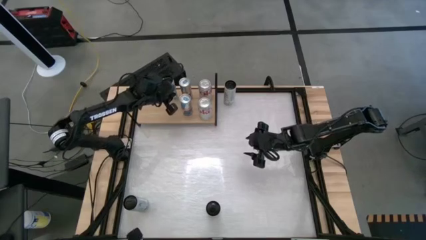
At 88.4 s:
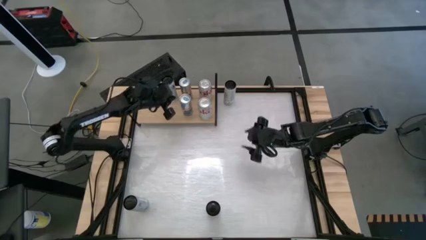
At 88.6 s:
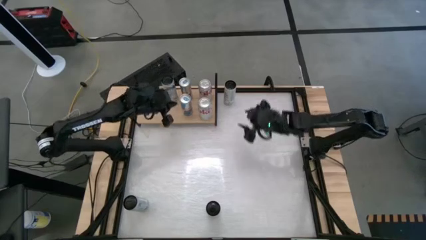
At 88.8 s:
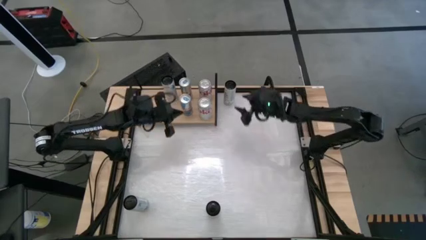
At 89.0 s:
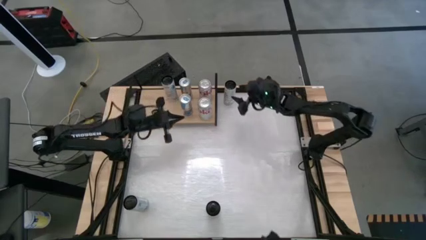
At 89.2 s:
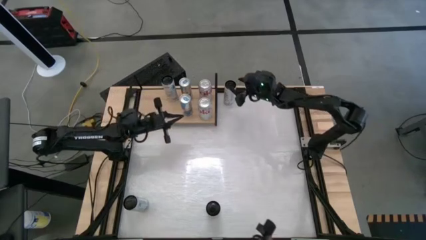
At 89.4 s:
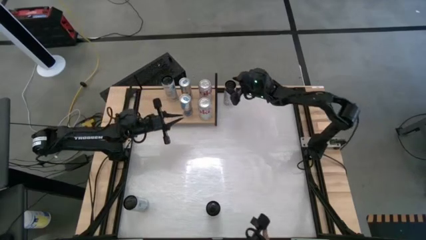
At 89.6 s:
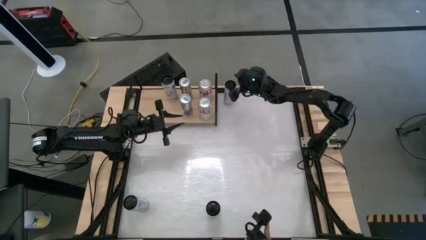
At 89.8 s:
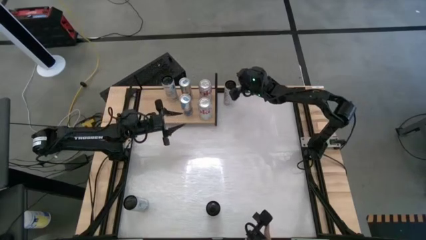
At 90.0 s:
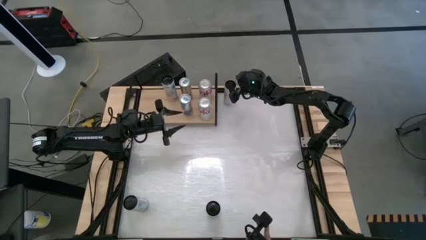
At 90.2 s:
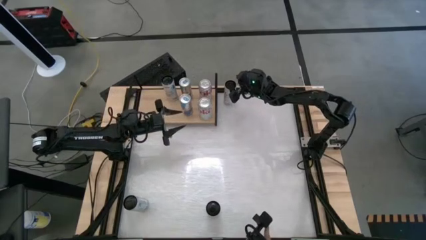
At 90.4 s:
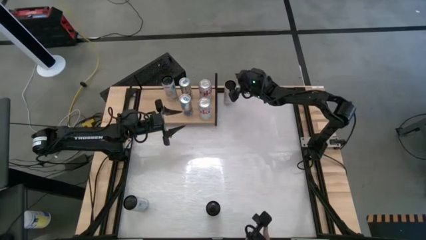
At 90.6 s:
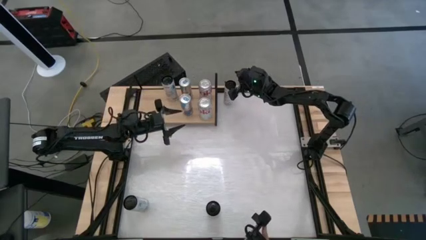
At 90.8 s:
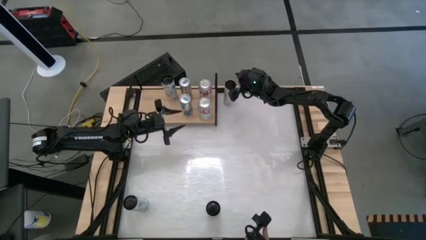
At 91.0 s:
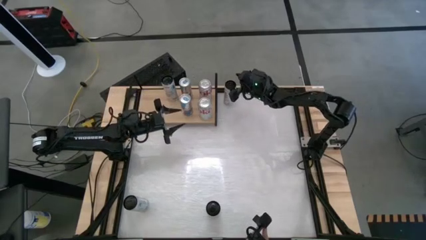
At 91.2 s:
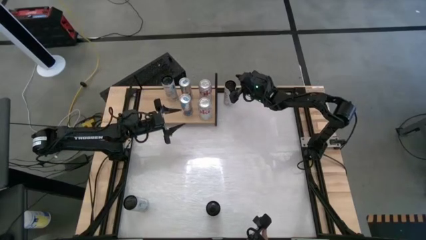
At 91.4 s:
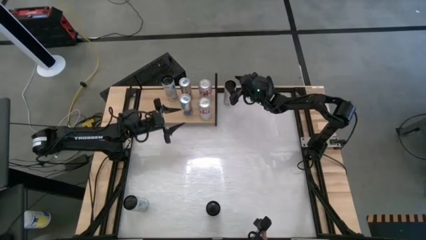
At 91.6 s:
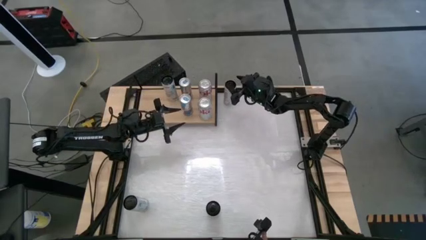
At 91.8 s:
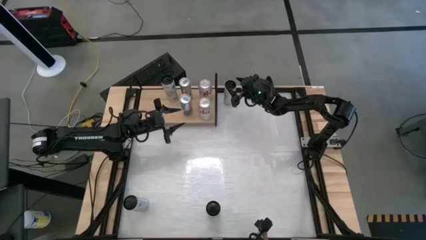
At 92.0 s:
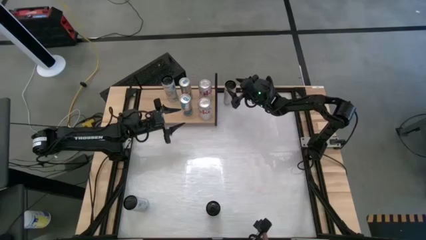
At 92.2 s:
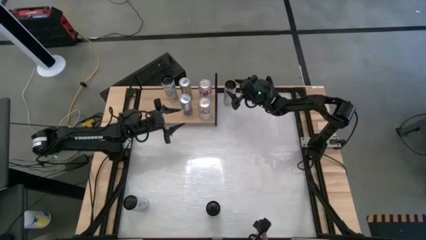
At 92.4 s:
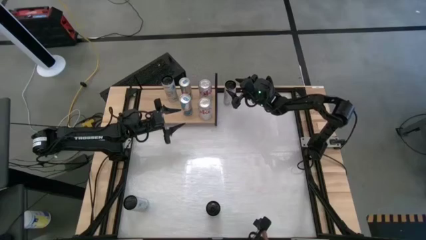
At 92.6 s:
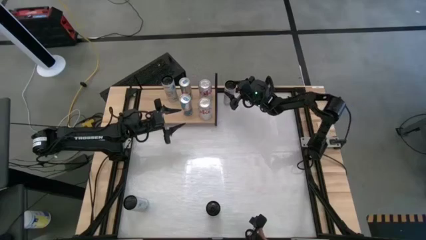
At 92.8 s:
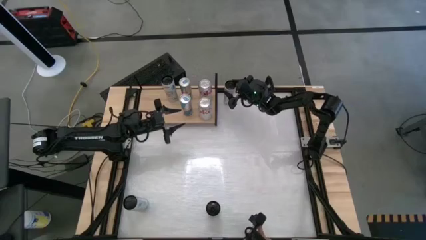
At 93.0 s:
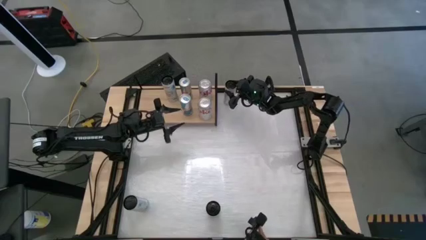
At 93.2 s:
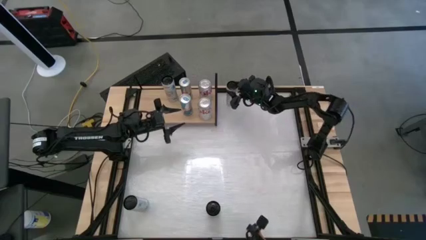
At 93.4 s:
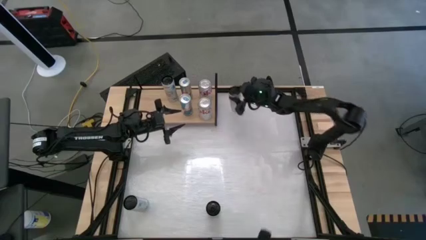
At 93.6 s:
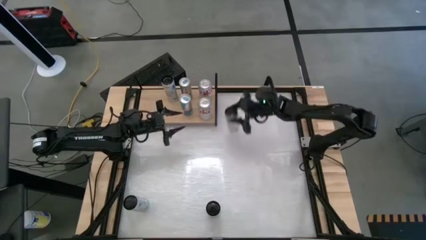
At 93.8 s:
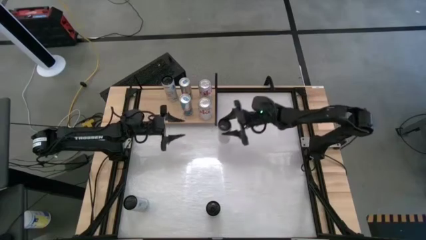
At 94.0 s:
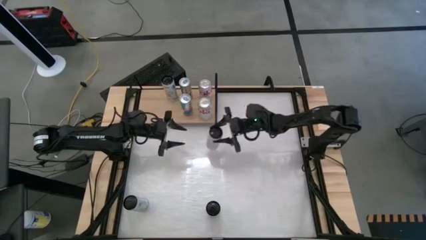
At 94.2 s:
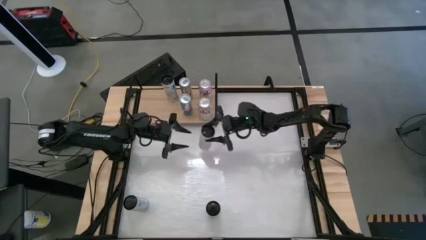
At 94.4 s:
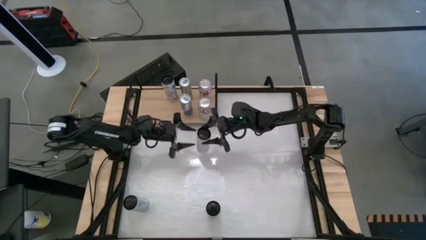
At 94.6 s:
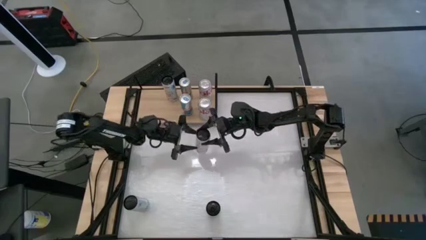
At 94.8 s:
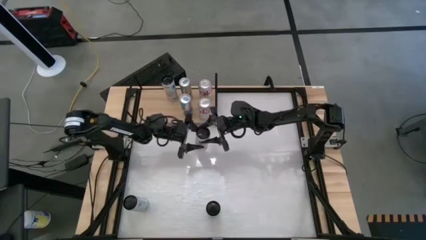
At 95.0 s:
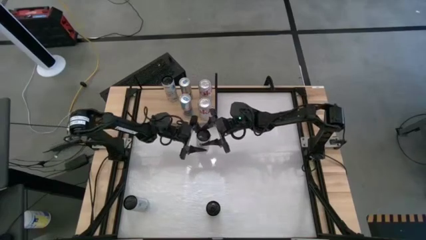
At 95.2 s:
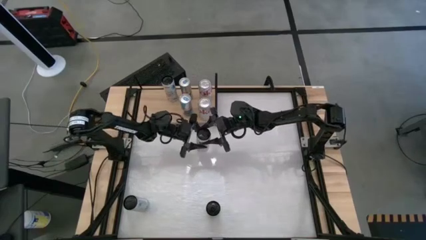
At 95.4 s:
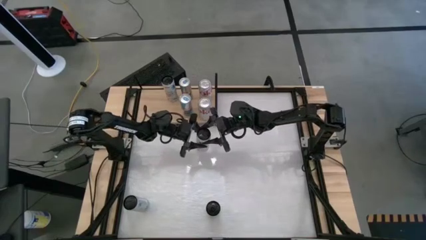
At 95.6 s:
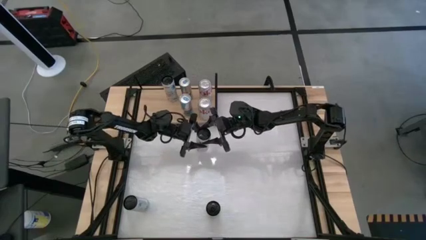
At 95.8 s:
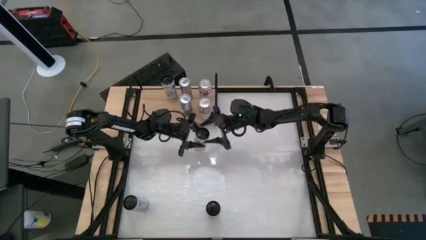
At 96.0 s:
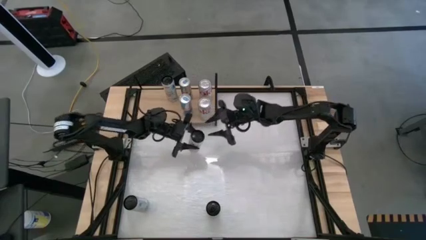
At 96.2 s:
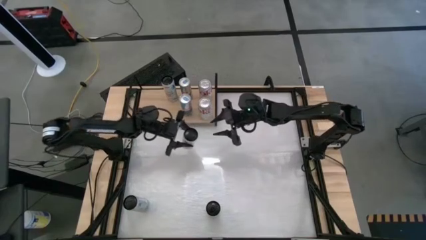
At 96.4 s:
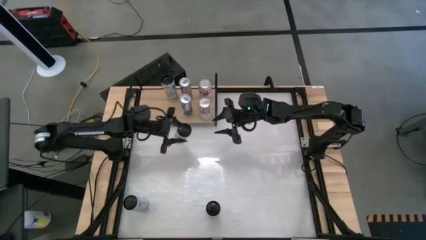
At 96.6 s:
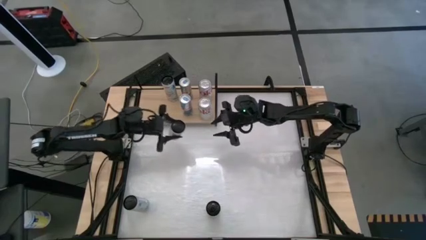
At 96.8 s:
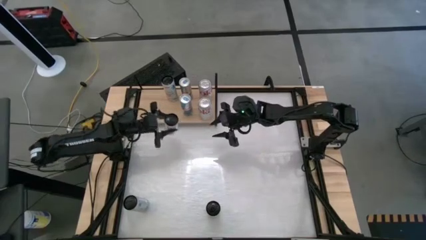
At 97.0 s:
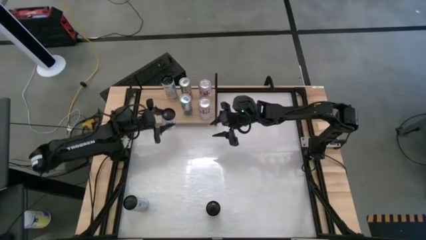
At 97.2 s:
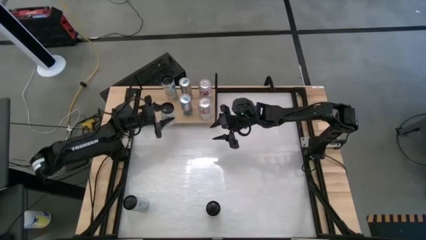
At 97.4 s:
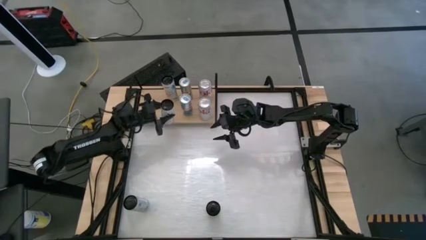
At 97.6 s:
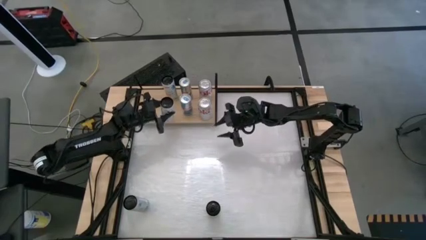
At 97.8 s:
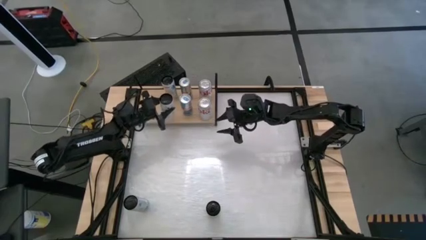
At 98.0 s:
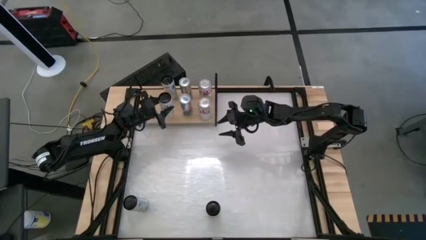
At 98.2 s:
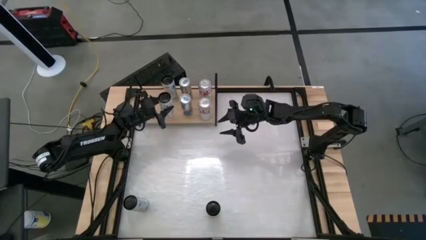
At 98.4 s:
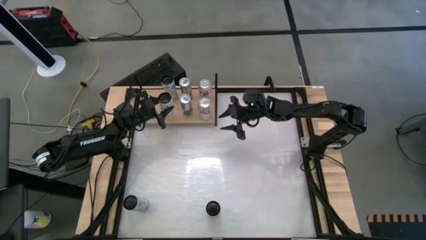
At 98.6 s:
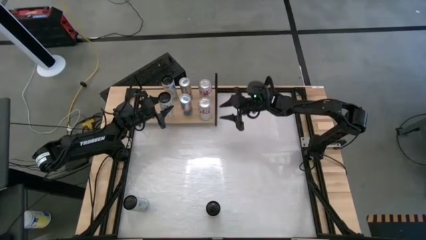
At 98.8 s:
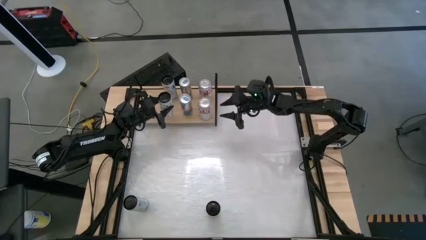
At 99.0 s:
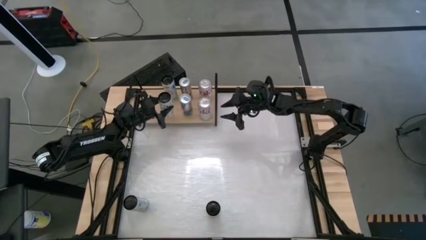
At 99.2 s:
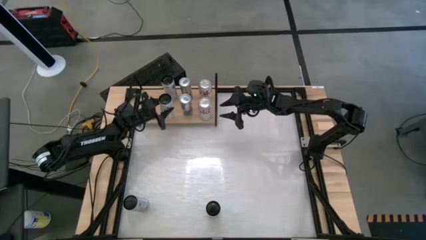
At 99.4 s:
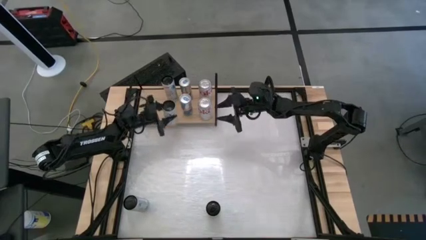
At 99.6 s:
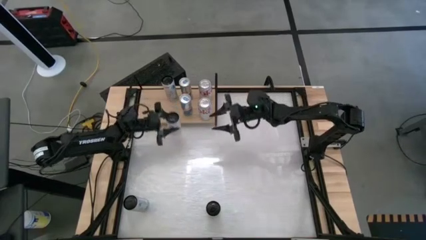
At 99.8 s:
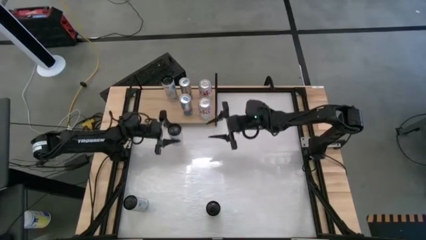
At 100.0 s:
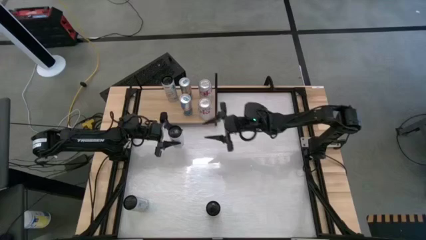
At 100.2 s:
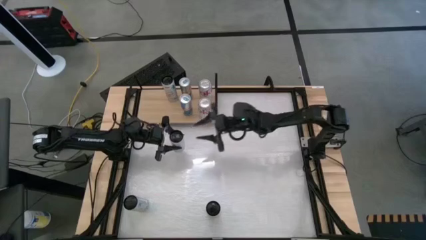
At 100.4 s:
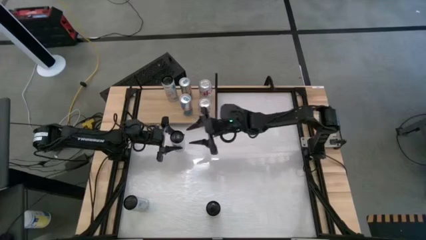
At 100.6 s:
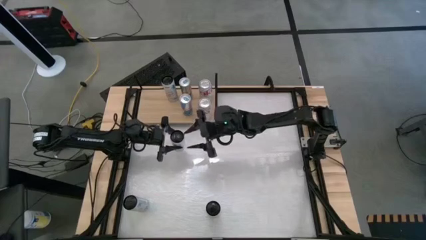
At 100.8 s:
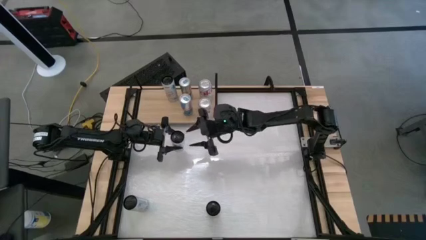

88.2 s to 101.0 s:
Task: Place canned beverage on shelf
Put the top yellow soda can on the shelf

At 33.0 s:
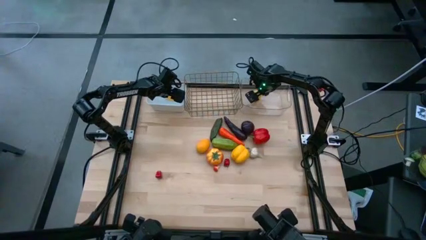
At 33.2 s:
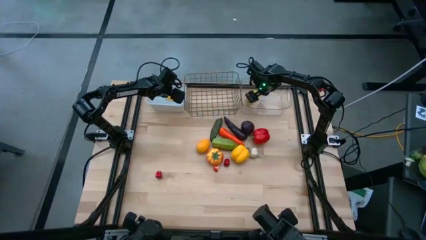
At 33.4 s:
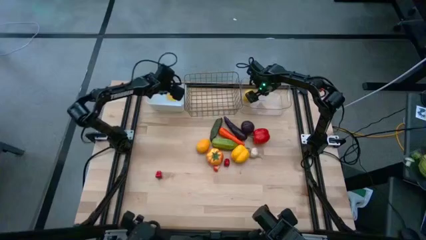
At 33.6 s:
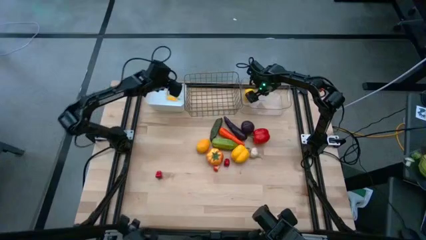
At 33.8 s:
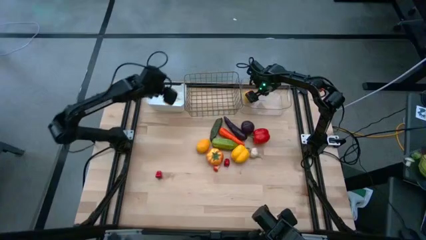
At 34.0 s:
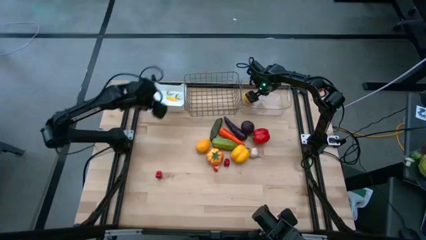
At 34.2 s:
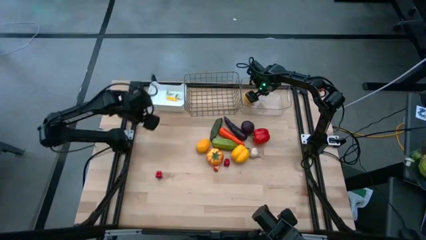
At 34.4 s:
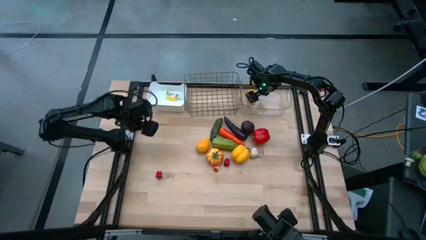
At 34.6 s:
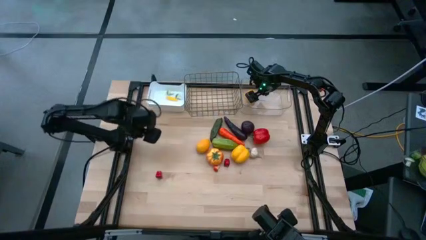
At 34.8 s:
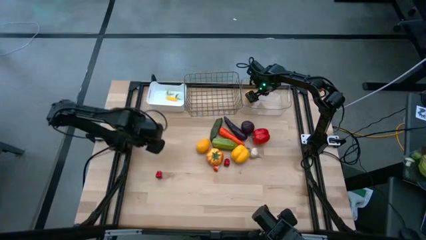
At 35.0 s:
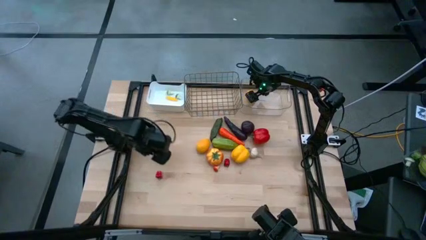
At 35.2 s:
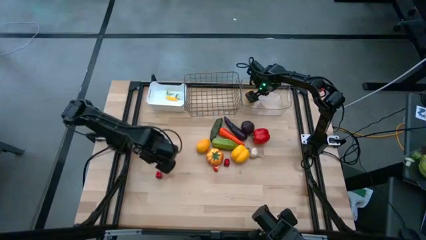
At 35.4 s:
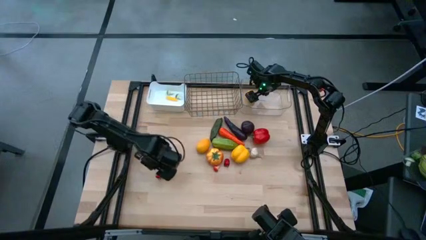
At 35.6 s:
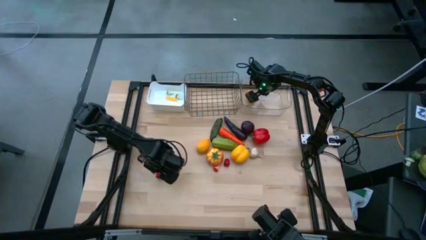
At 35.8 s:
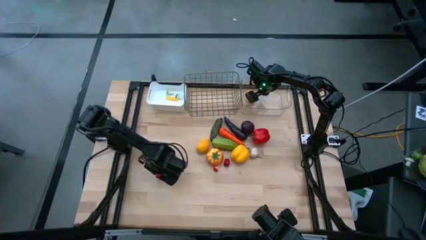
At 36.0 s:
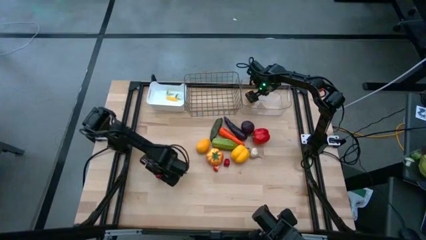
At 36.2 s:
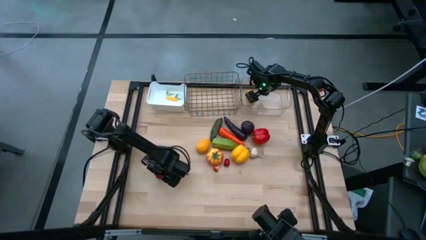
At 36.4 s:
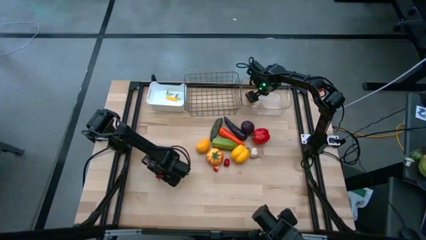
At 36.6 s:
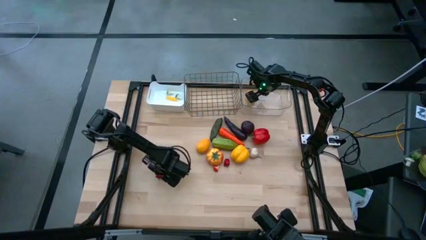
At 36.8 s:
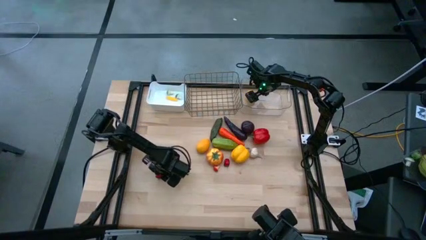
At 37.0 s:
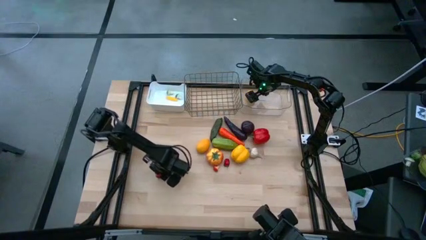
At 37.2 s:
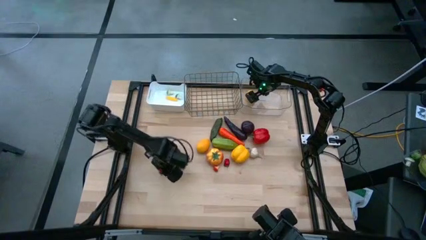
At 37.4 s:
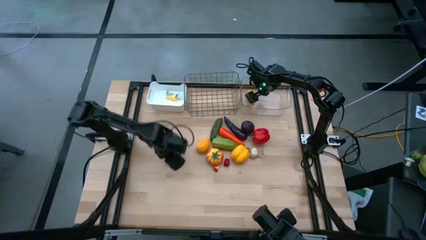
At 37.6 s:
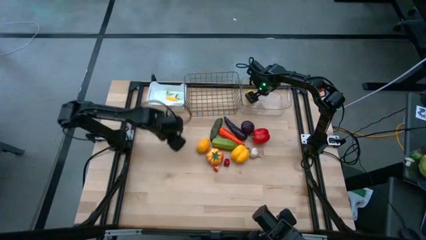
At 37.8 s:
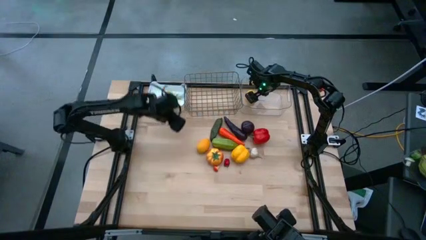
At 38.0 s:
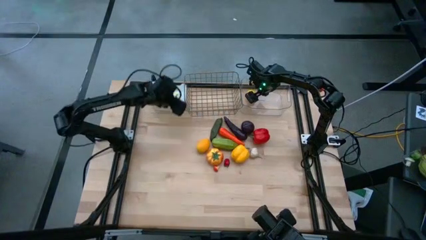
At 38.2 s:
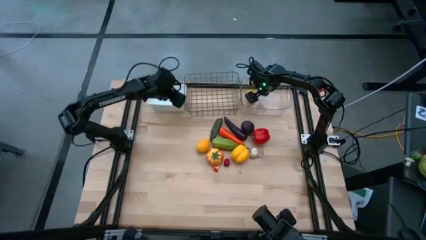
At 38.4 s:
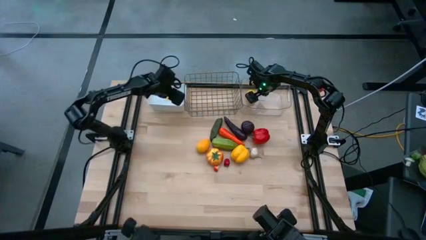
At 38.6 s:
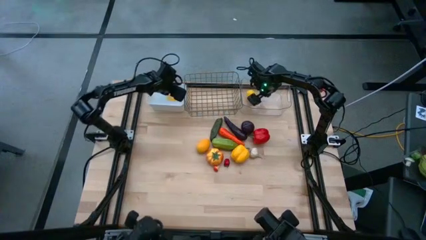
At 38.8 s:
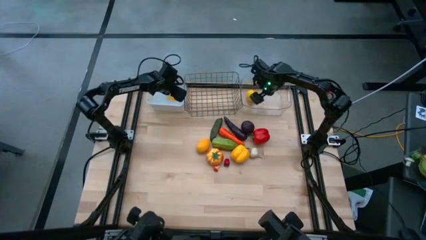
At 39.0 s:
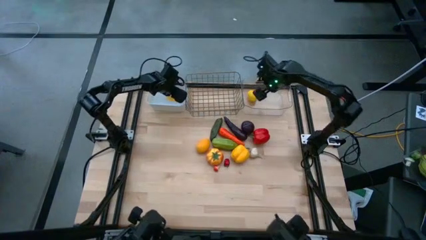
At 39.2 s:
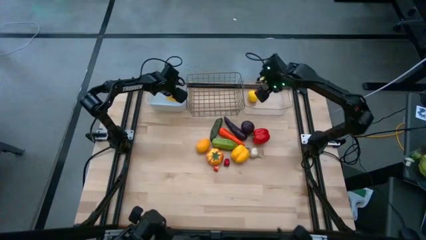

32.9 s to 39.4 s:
Task: Sort produce into baskets
Put the left small red bell pepper into the white bin
